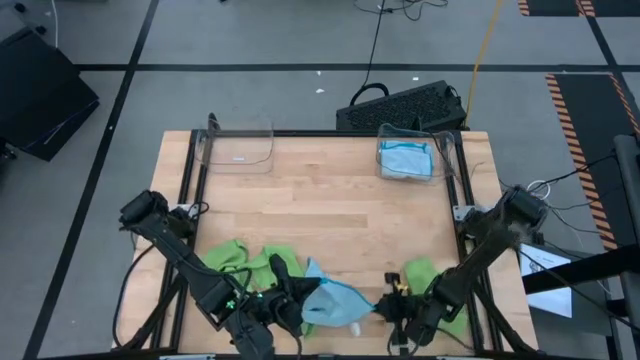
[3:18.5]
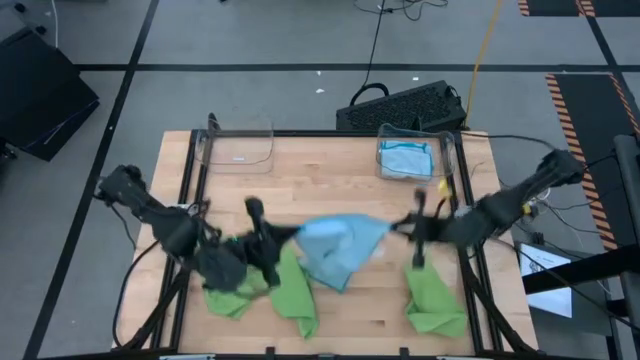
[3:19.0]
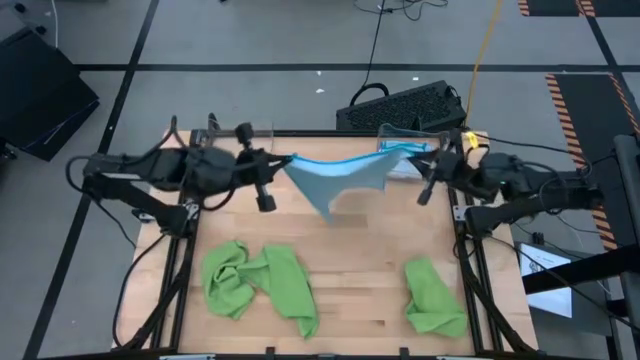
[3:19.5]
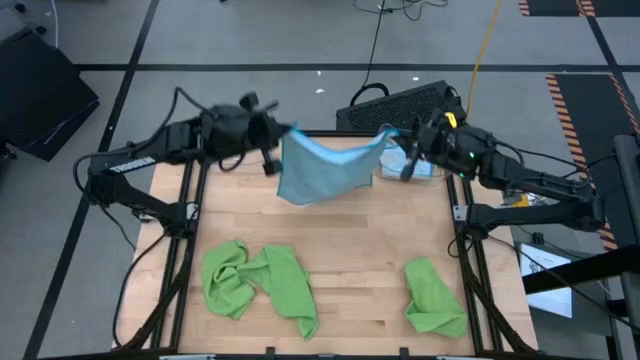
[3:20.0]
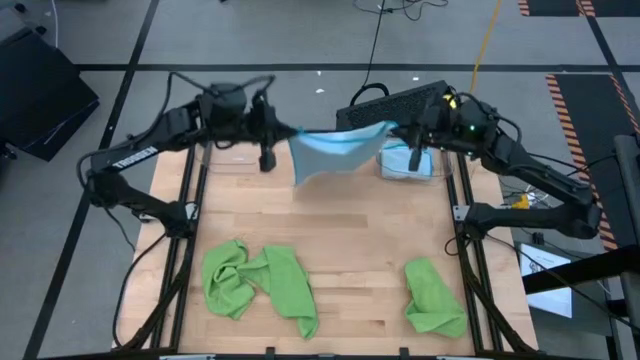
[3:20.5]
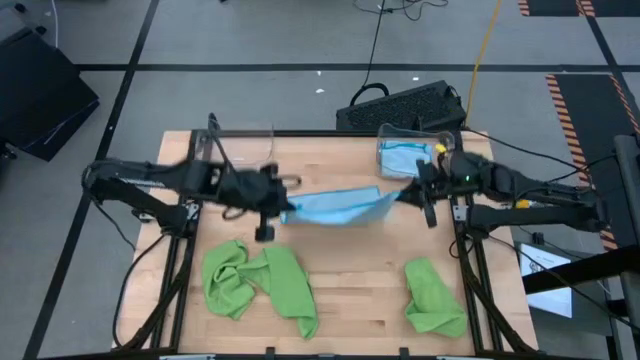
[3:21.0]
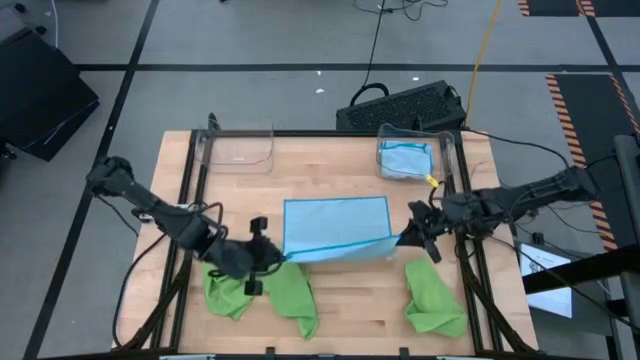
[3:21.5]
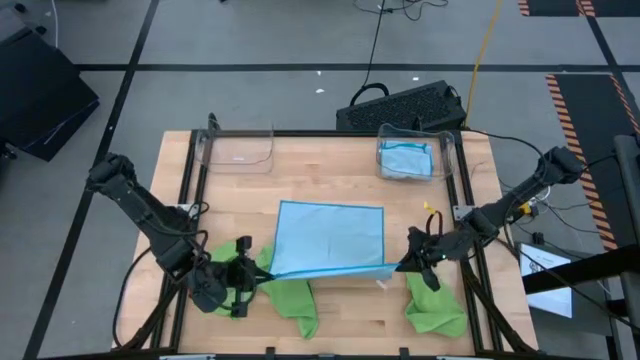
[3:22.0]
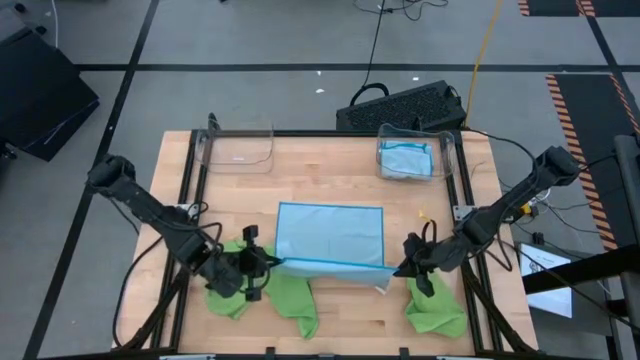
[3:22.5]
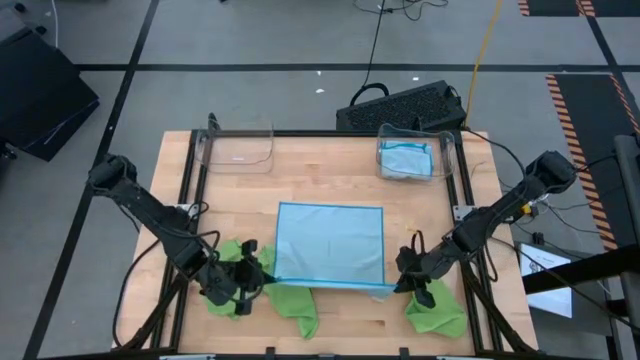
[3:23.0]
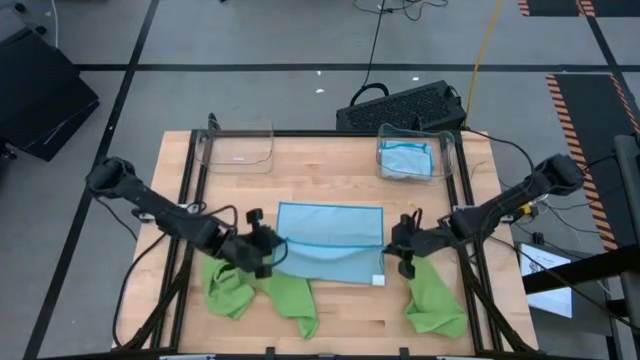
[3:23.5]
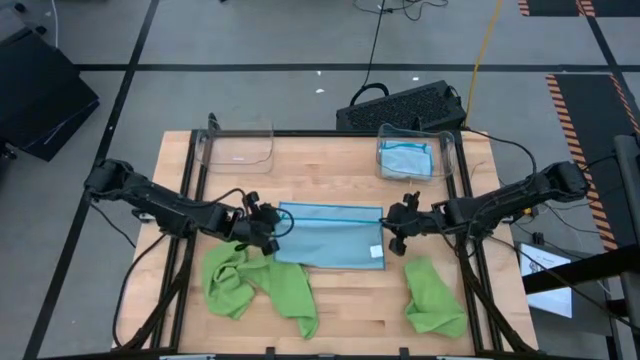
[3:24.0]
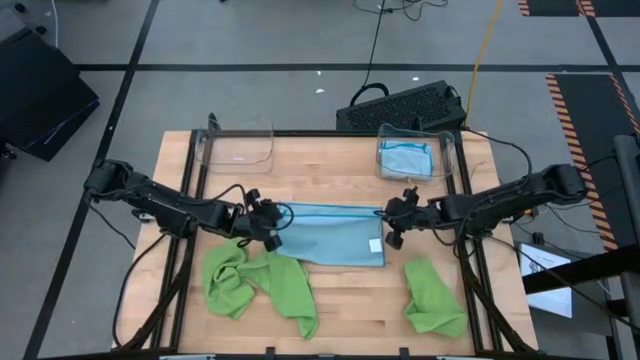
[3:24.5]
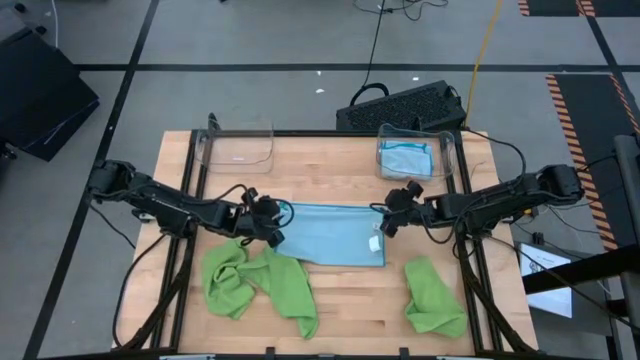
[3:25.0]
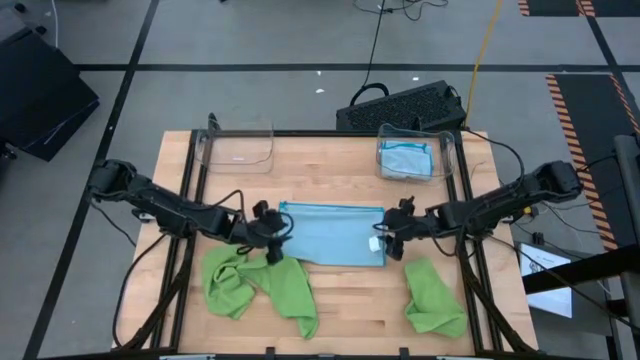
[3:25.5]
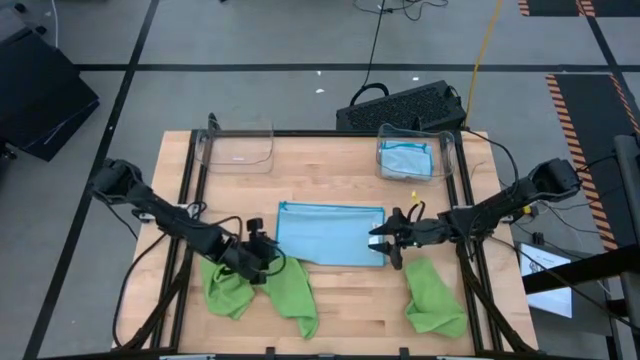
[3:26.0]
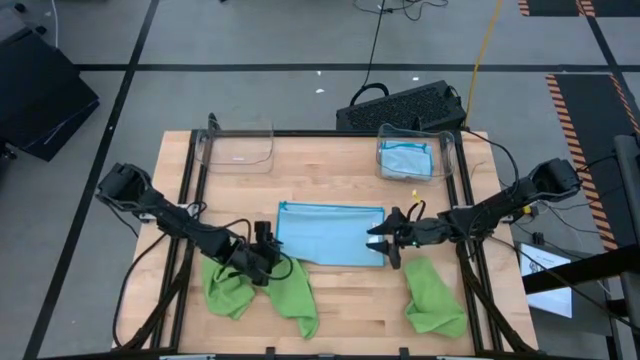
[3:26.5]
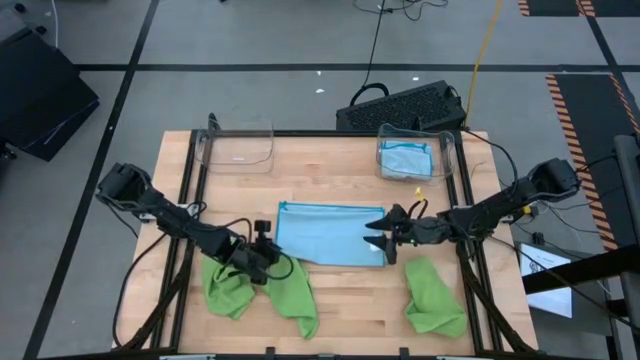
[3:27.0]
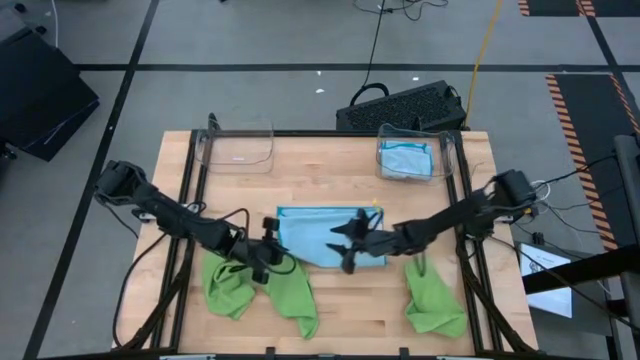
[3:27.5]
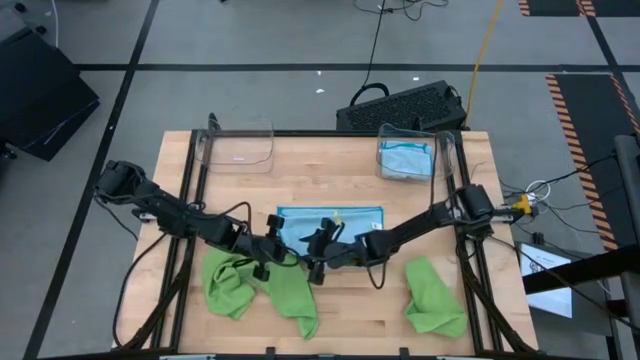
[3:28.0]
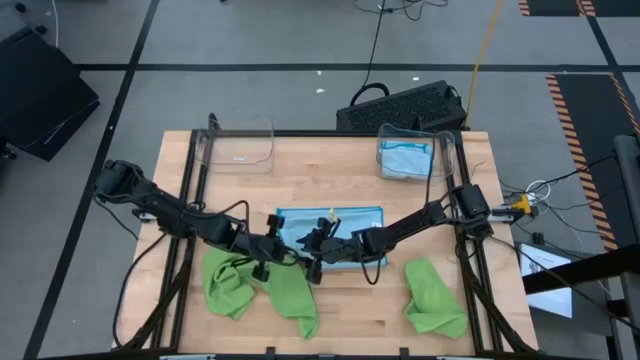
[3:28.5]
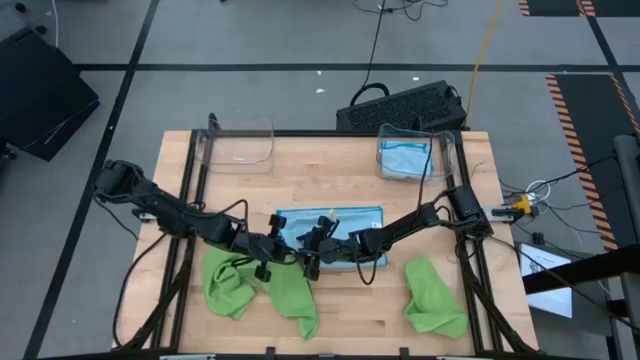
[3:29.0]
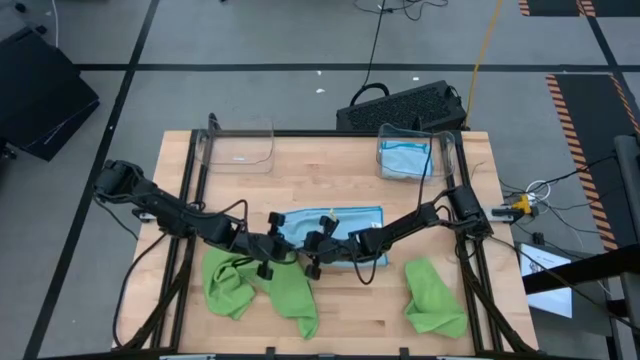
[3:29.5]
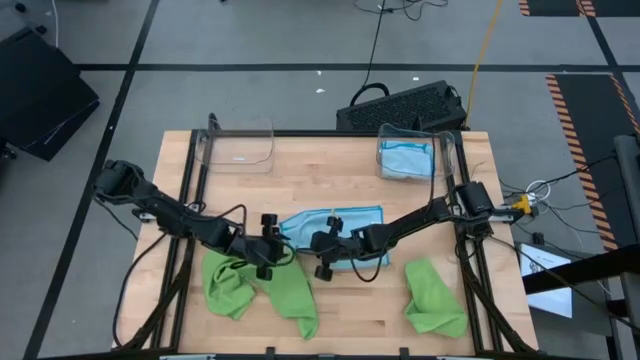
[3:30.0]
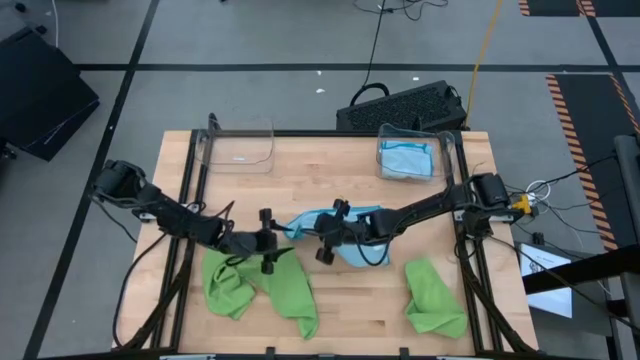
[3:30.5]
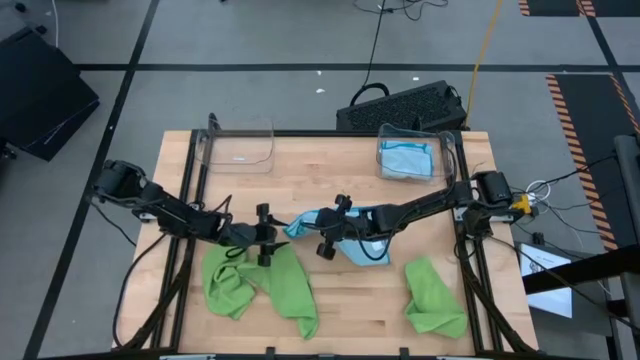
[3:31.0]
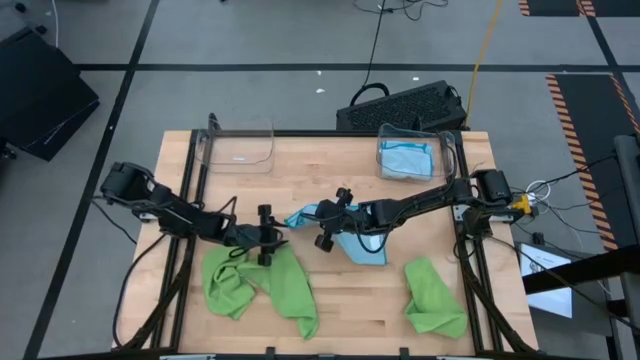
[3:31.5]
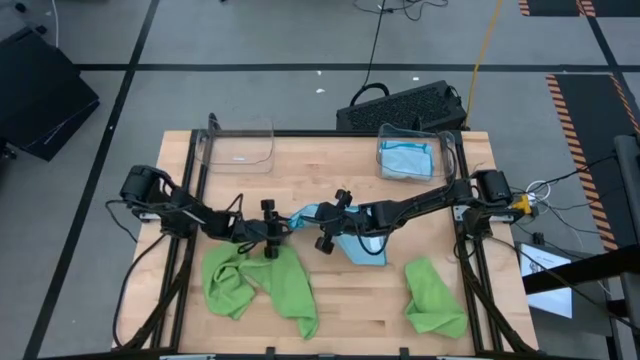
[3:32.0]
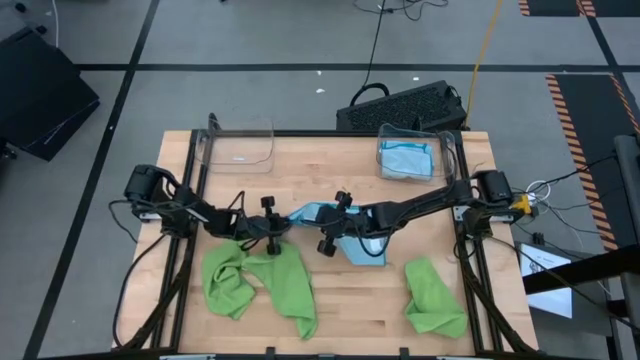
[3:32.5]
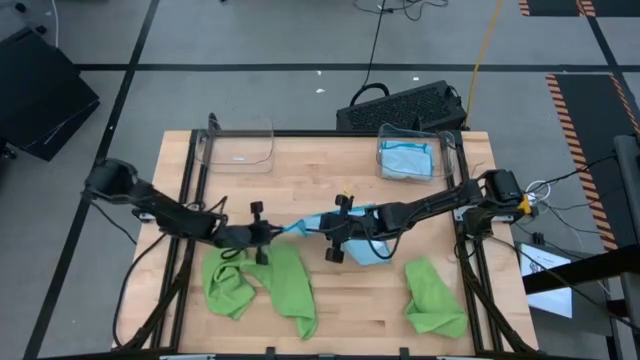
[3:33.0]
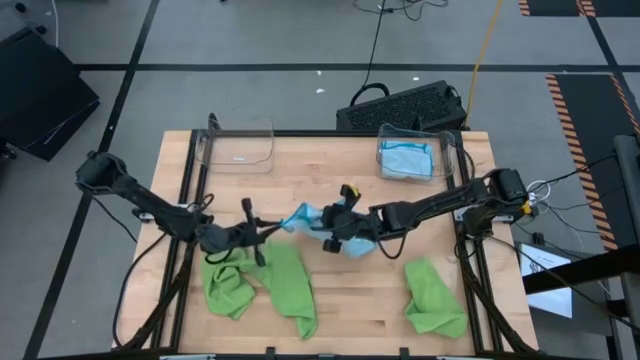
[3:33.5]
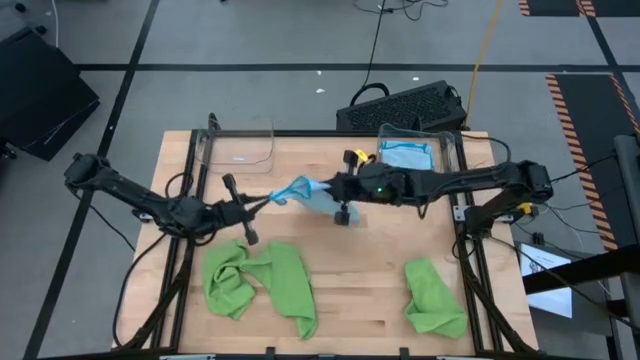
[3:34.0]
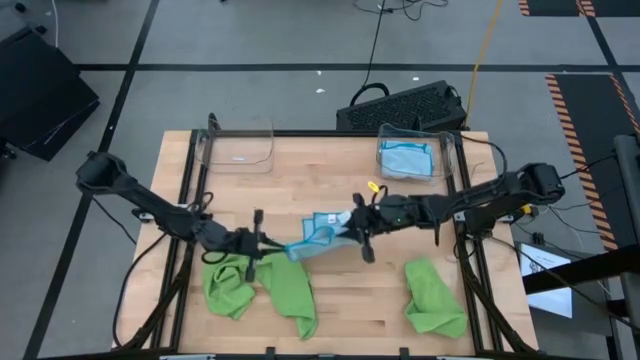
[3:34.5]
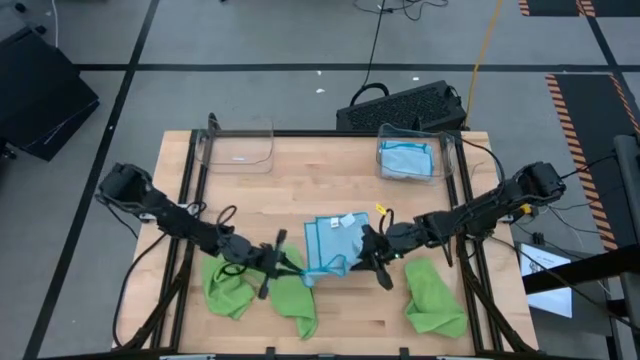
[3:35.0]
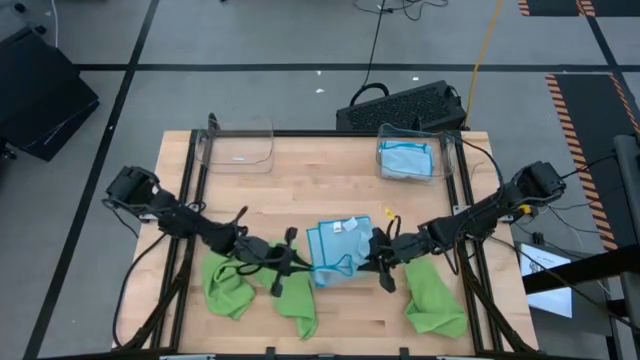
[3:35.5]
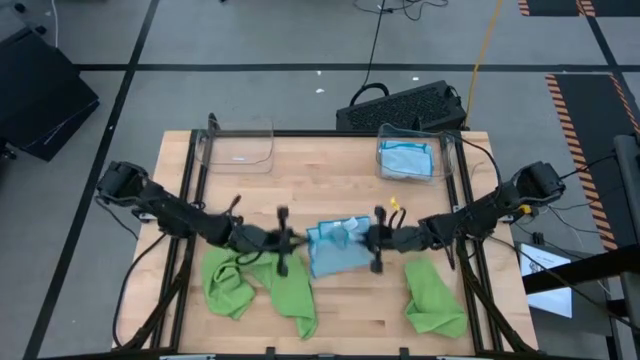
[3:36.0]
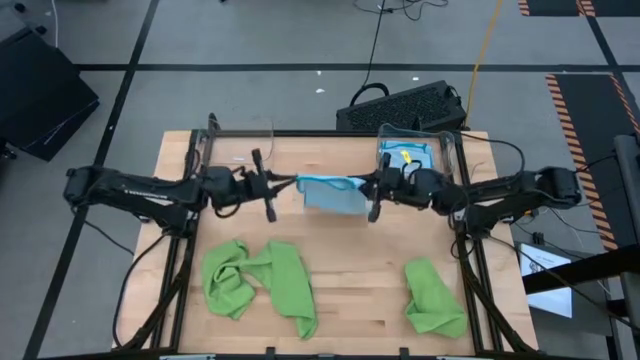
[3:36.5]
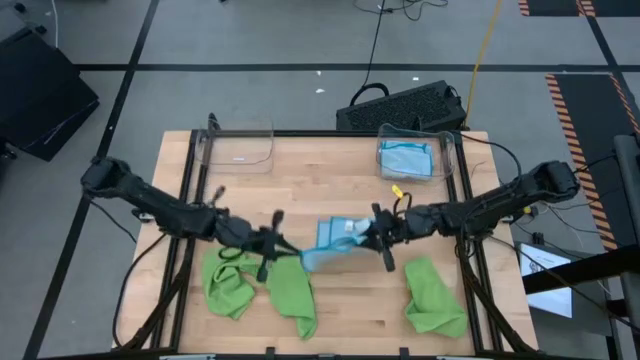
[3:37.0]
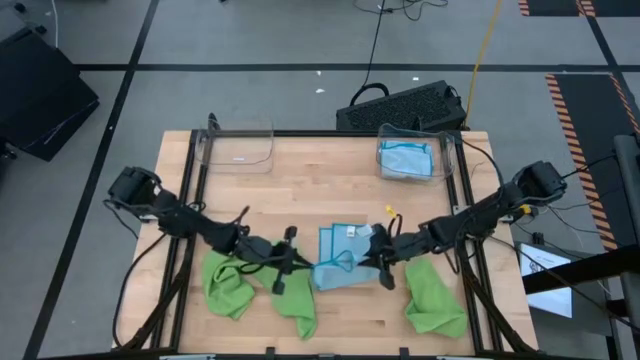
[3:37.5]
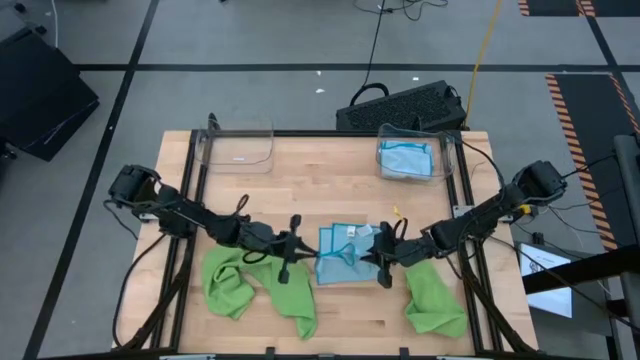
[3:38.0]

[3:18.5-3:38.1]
Task: Fold microfiber towels
Fold the blue microfiber cloth

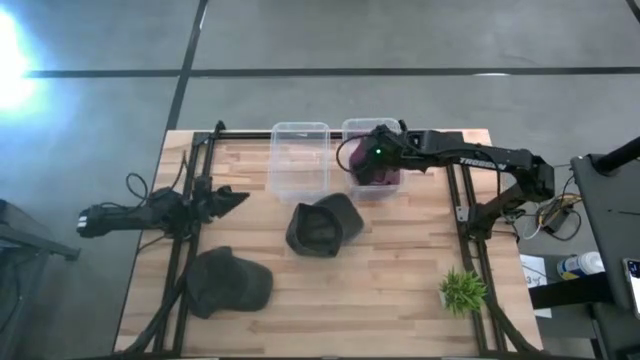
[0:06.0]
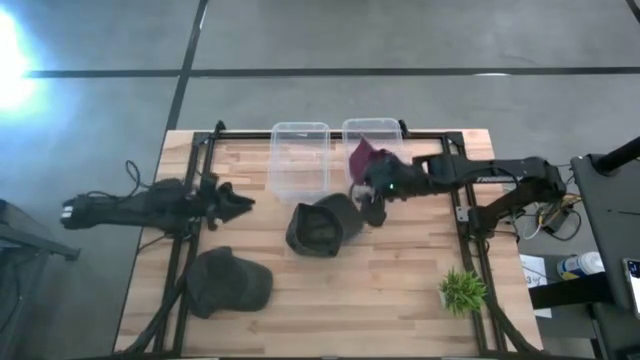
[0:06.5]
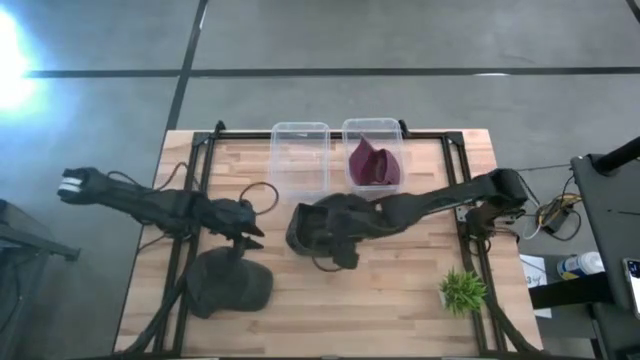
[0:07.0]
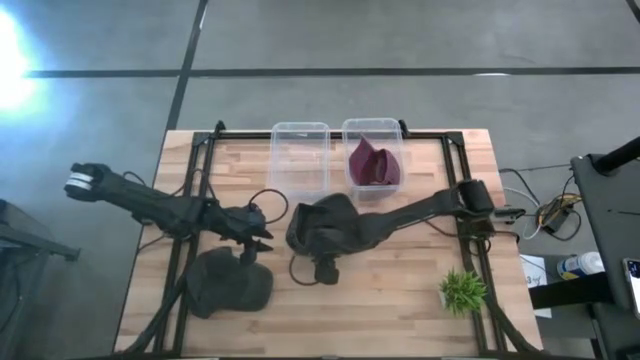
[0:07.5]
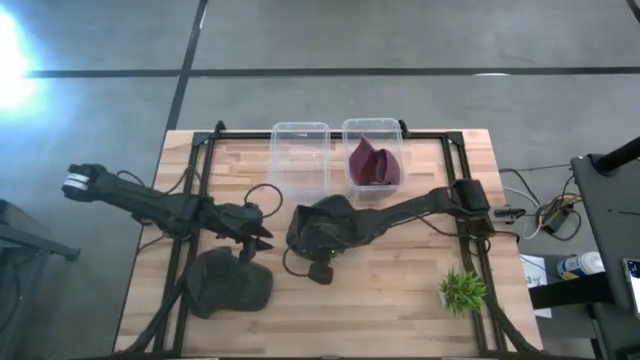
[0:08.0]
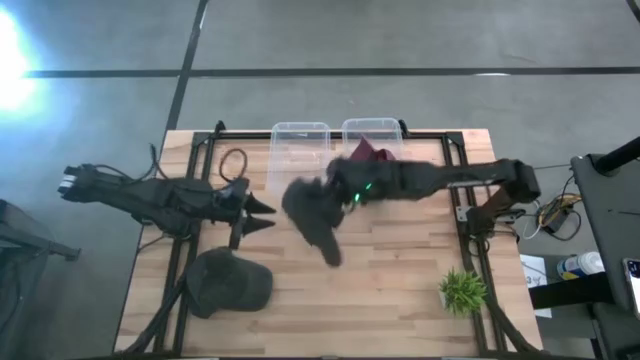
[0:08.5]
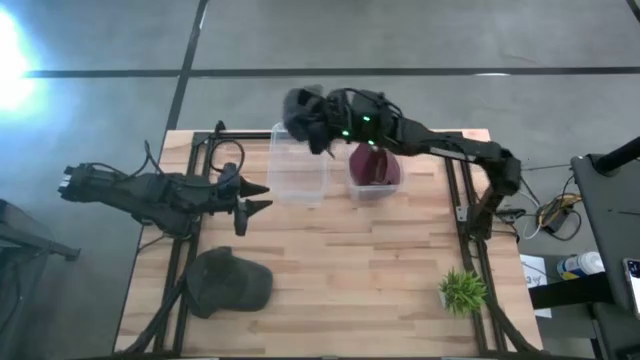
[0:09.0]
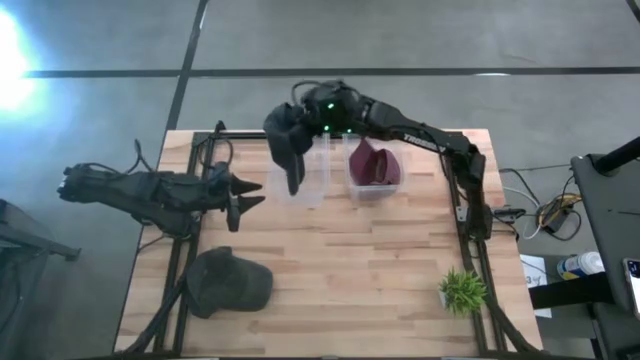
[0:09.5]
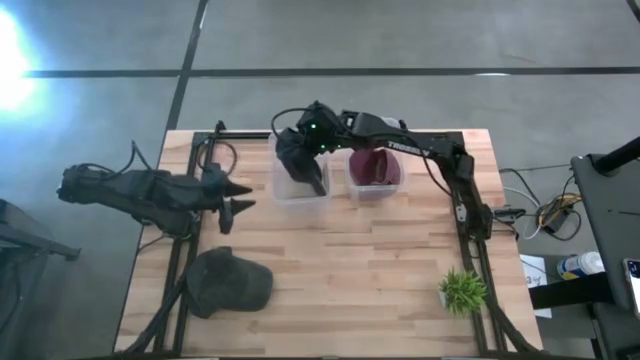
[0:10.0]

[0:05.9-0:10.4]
Task: Pick & Place hat
Put the top black cap in the left transparent bin
